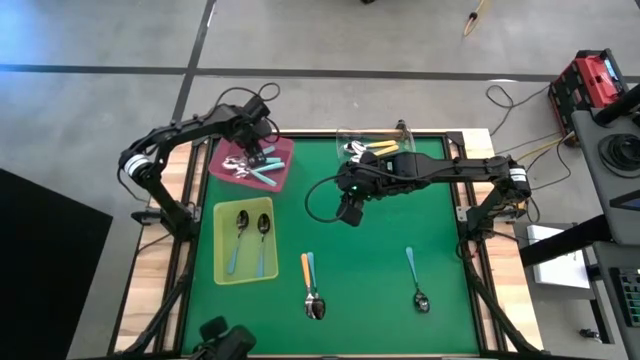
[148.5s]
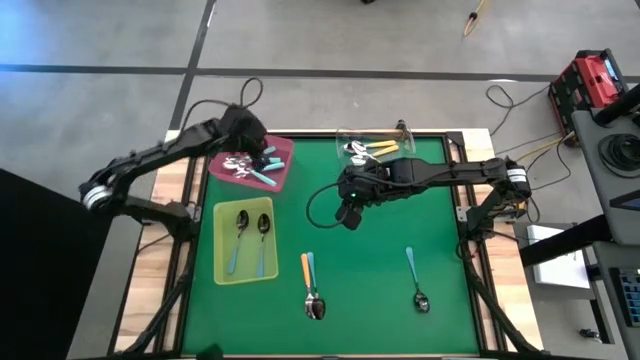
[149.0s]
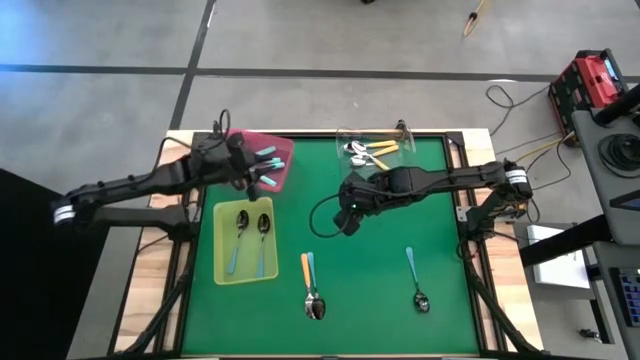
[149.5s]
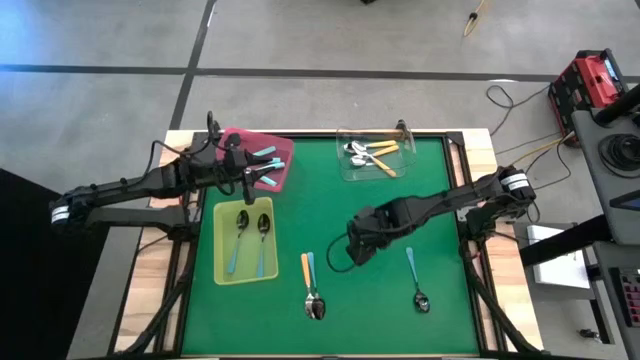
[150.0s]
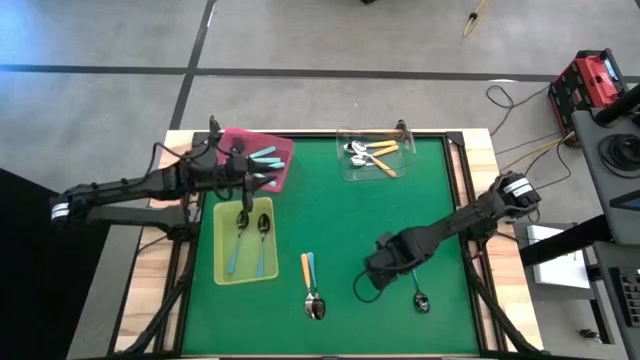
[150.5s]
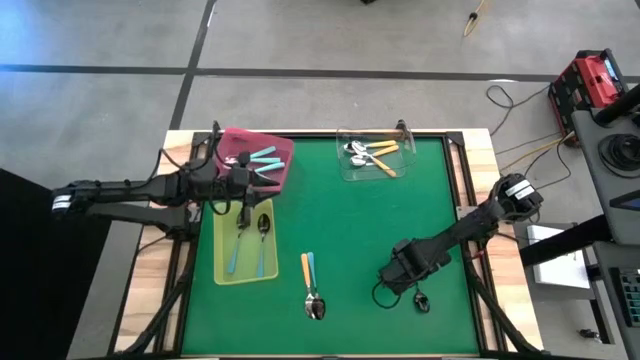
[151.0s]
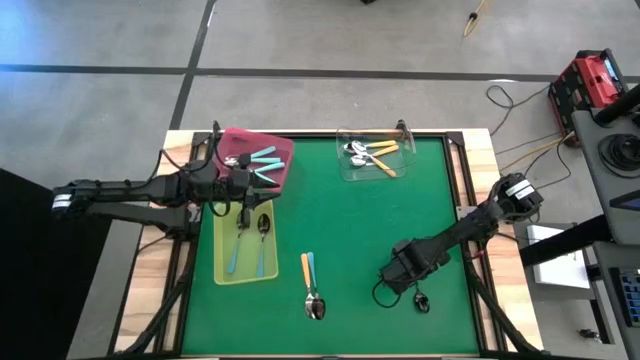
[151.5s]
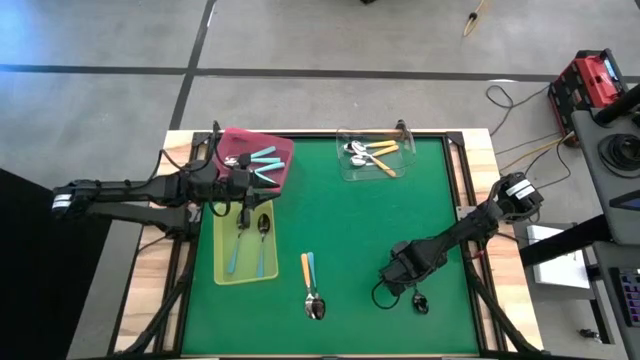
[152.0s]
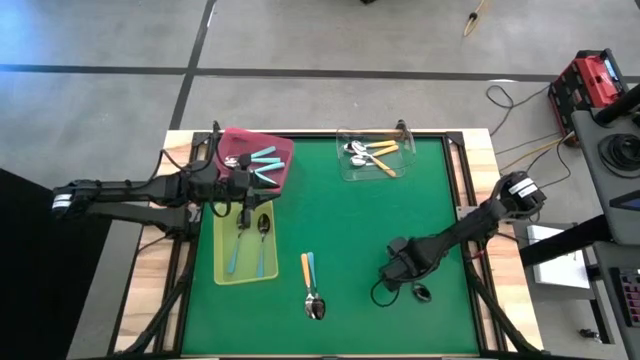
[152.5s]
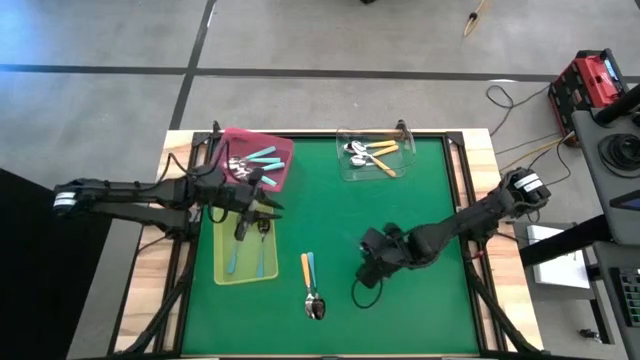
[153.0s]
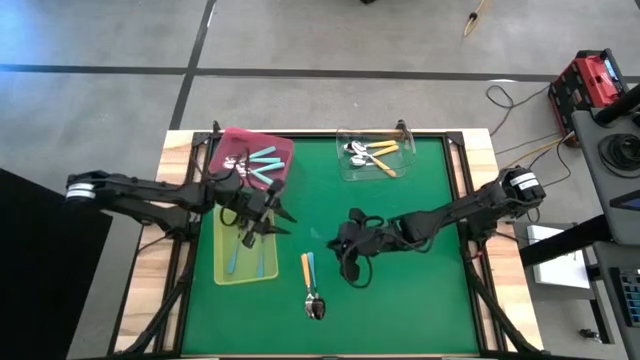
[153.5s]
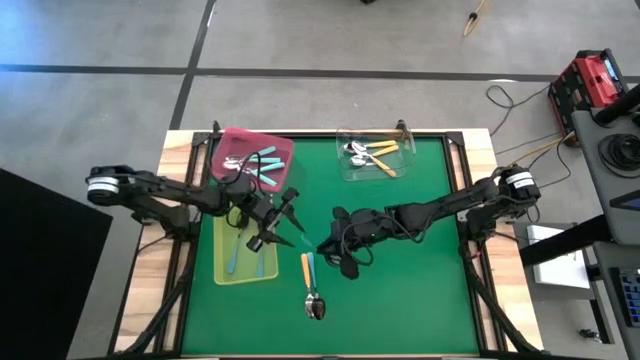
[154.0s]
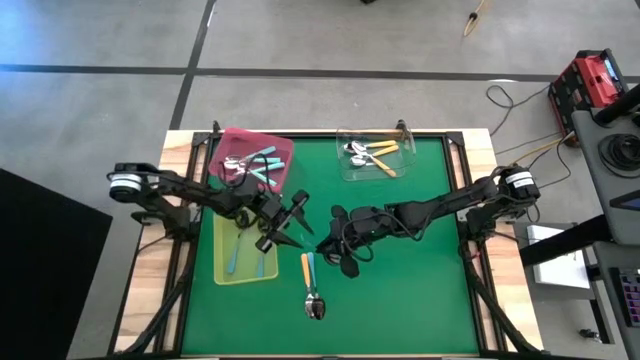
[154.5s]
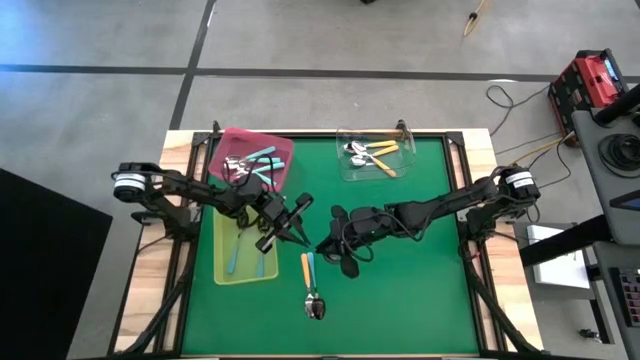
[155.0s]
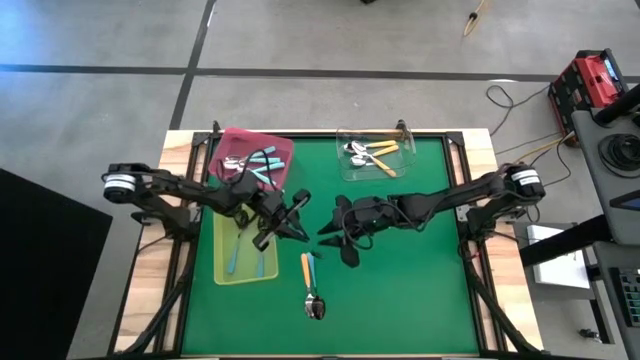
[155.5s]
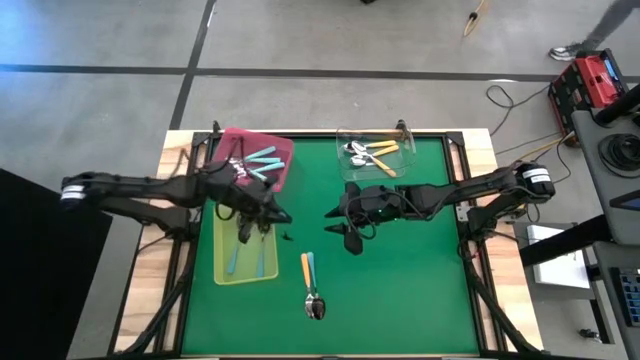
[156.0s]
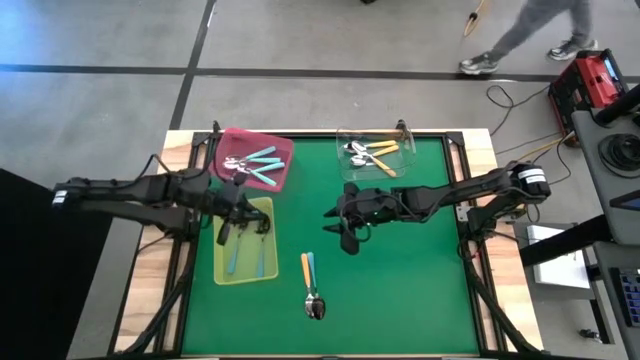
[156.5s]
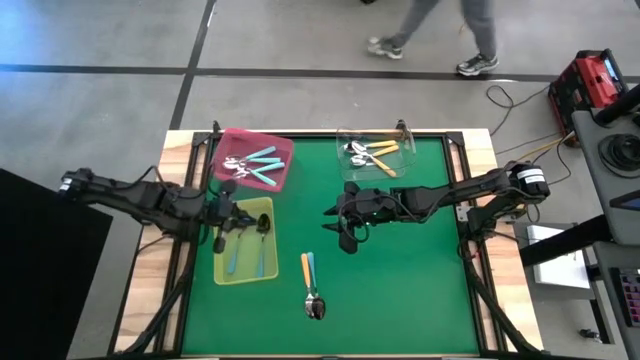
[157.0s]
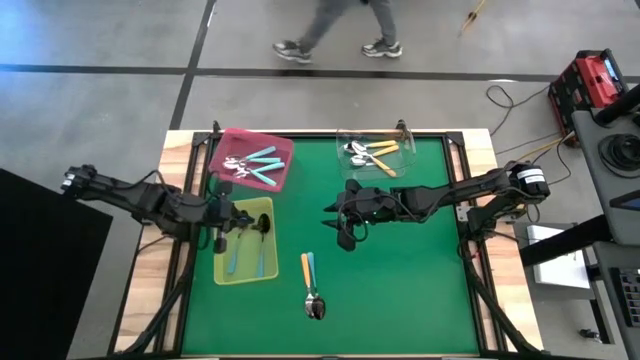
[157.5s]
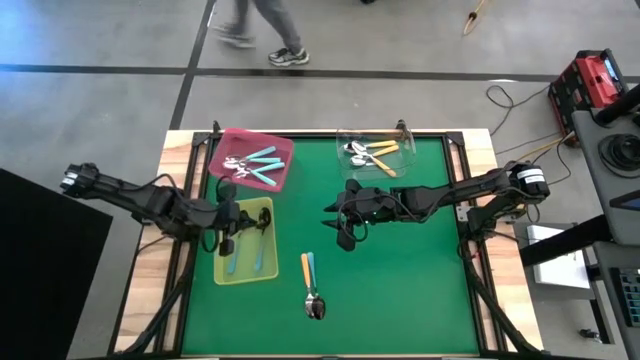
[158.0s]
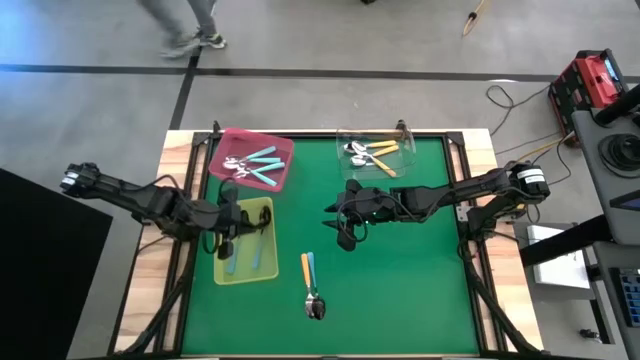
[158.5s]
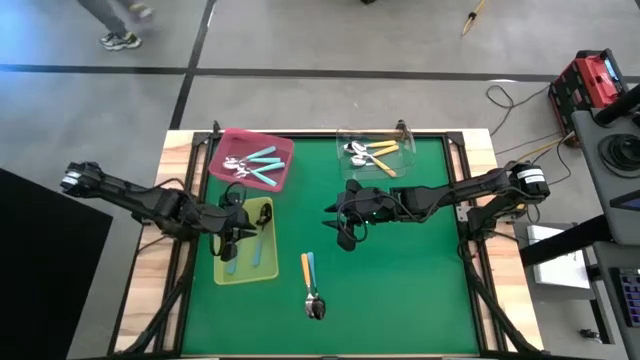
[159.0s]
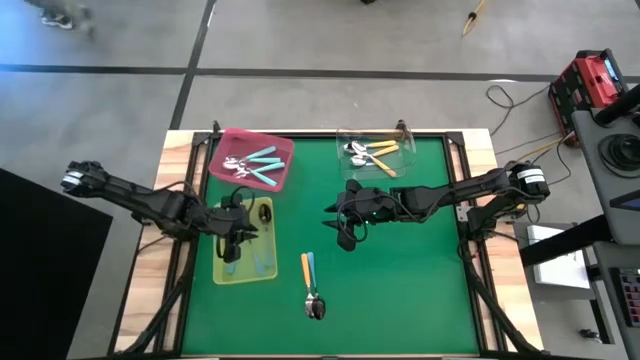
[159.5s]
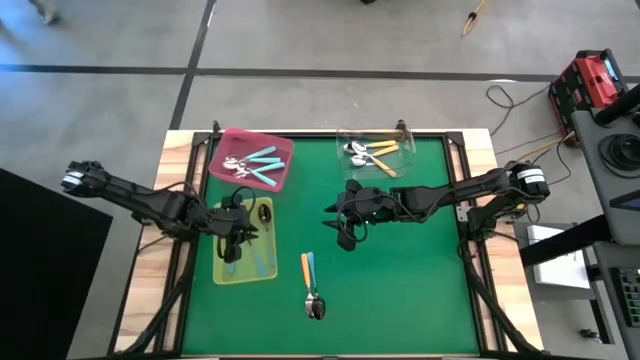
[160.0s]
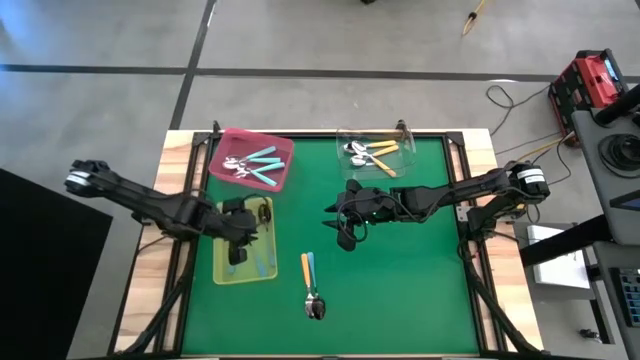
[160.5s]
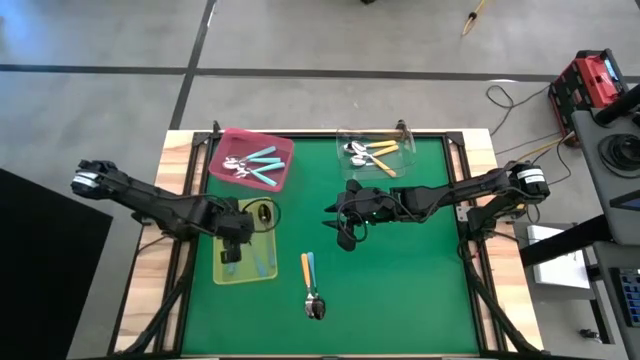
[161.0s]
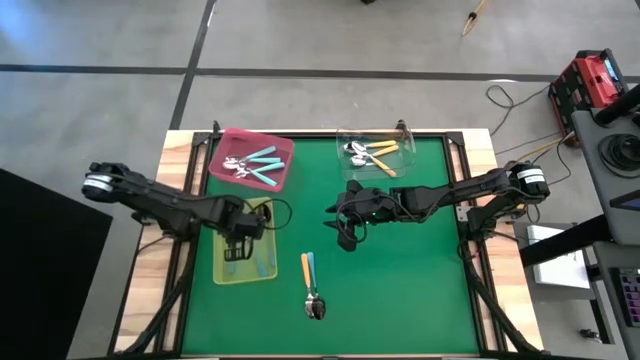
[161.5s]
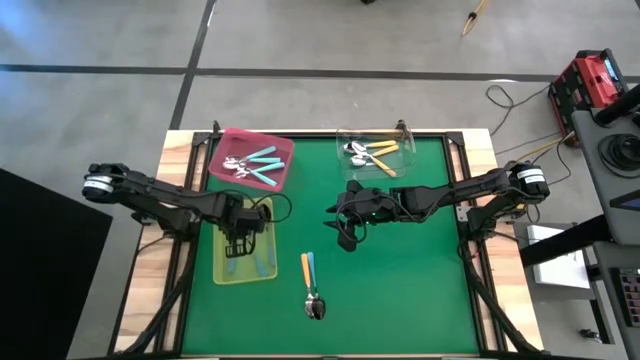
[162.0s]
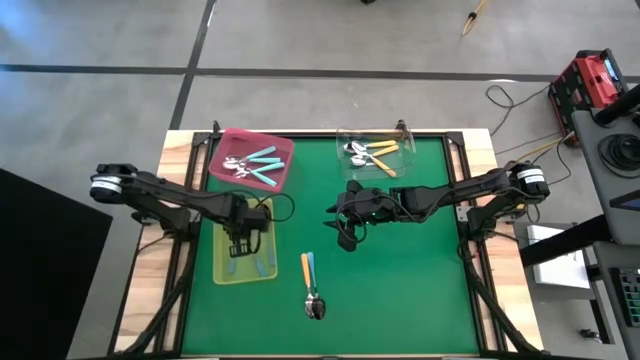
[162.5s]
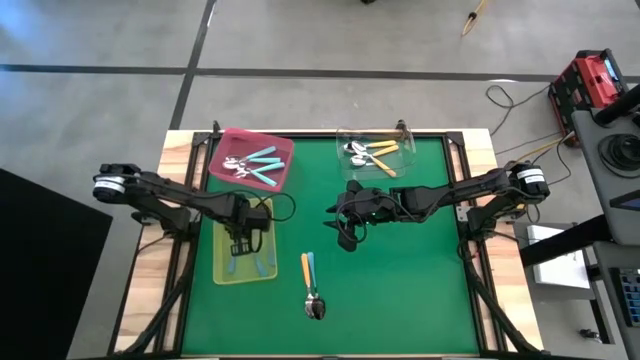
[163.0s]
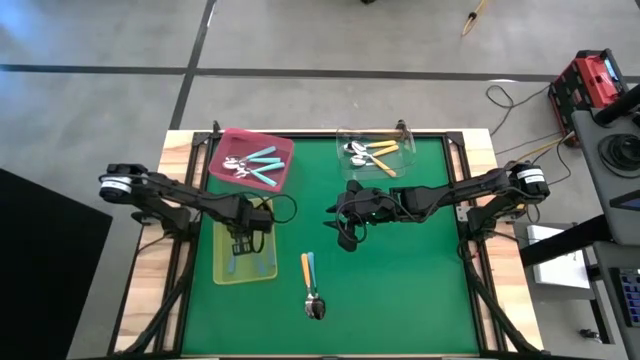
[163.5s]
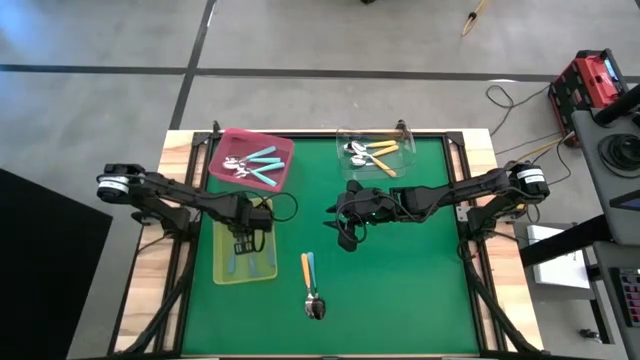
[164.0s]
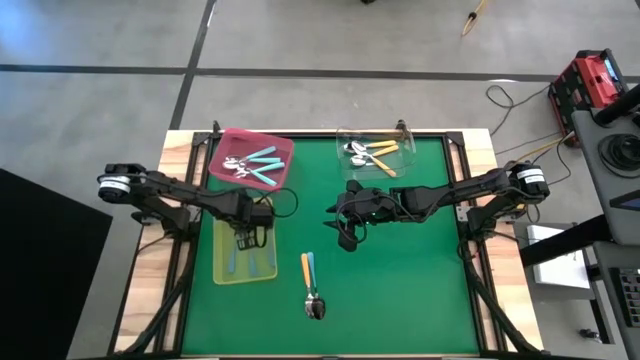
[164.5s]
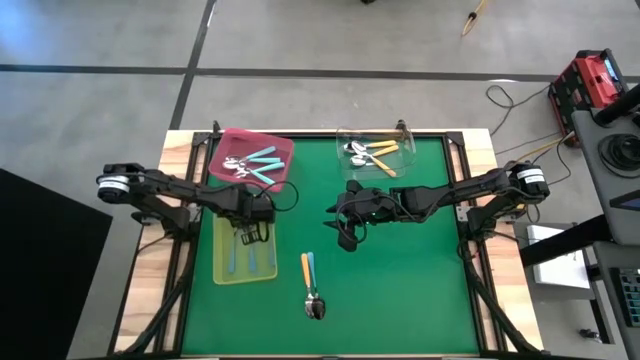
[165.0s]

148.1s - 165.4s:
Task: Sort silverware by color (type)
Put the blue spoon into the yellow bin

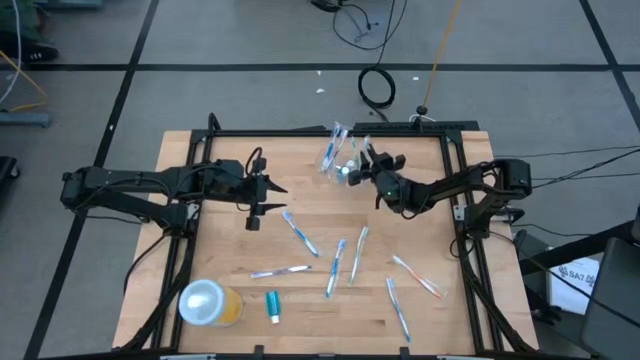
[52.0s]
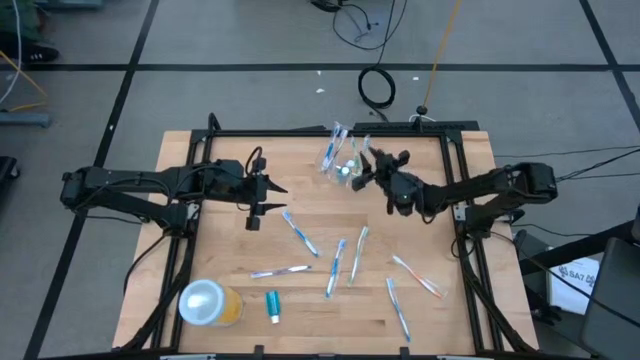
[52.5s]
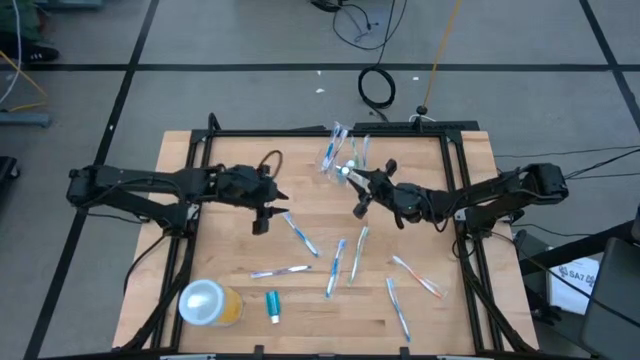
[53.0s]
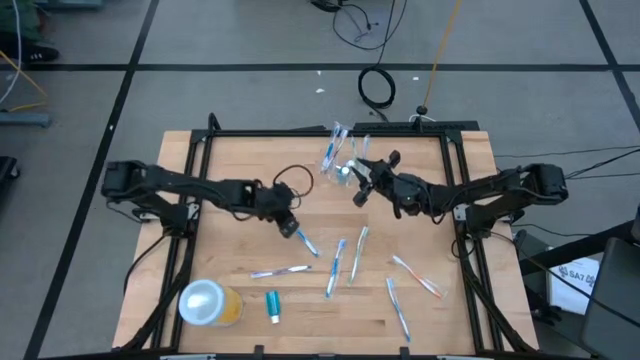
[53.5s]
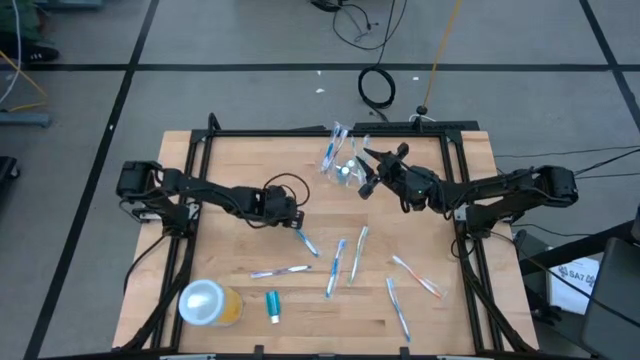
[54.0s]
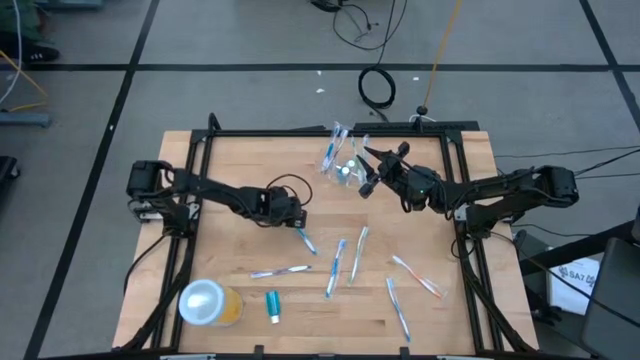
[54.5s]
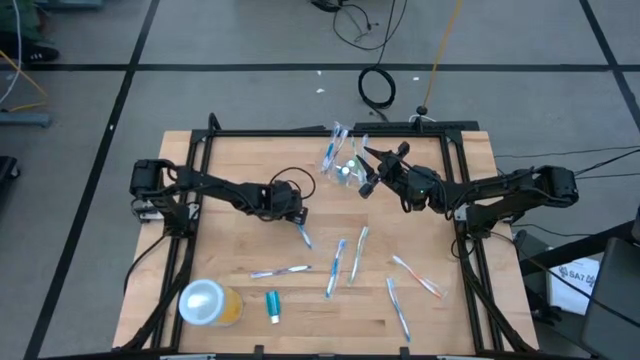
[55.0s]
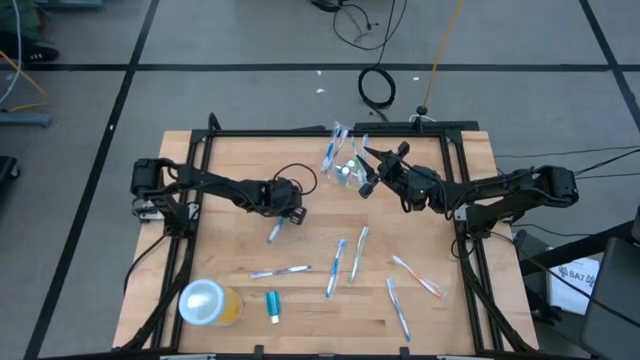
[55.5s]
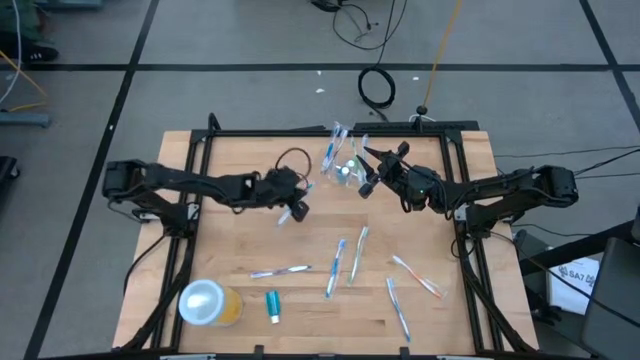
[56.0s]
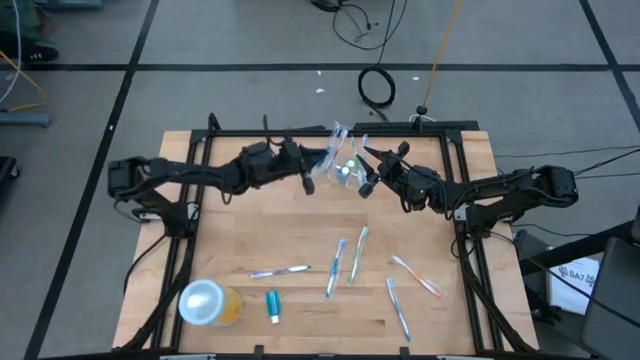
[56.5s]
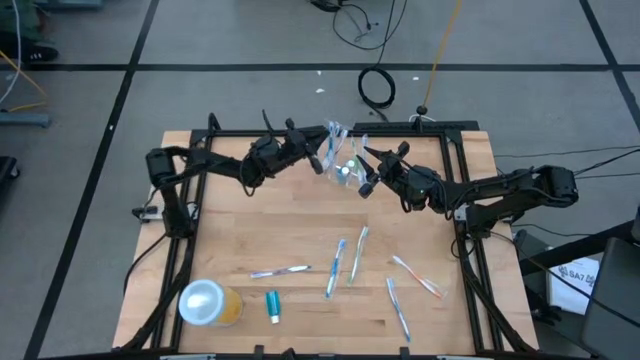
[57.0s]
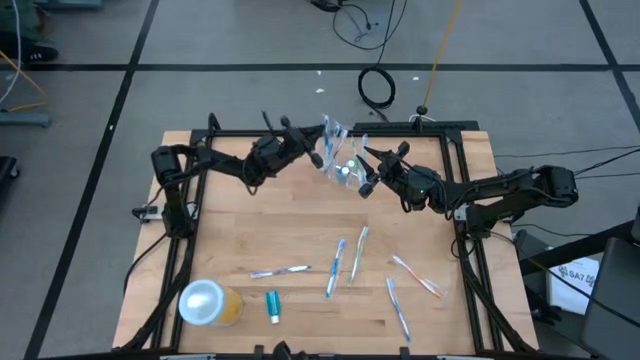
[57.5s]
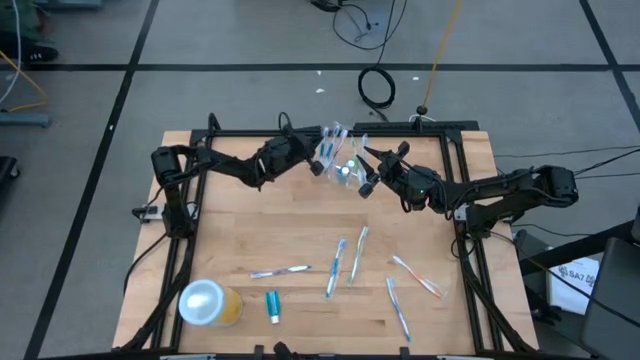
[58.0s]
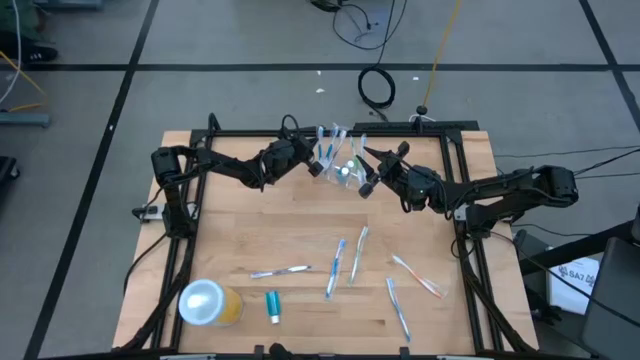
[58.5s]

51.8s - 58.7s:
Task: Pick & Place toothbrushing station
Put the toothbrush into the transparent organizer
